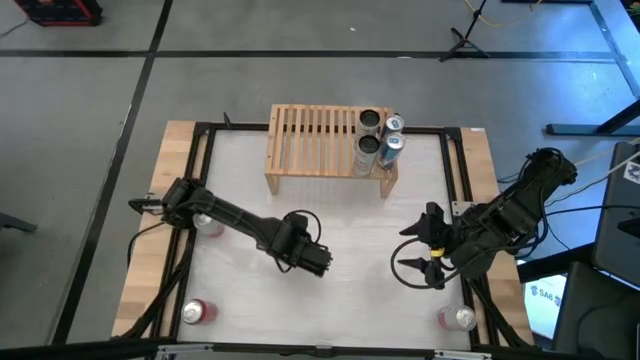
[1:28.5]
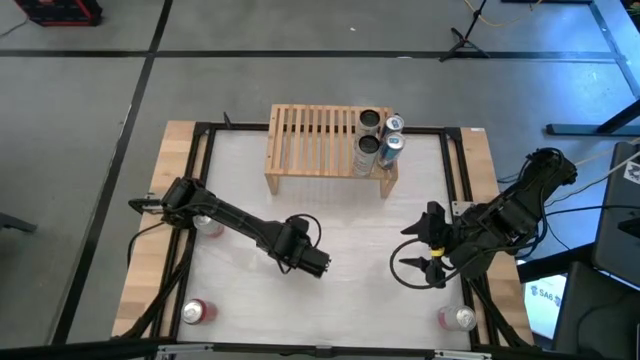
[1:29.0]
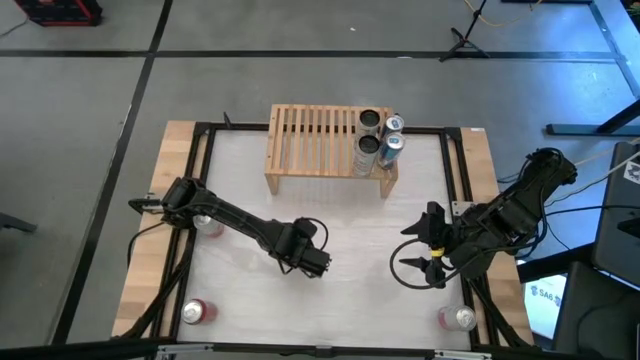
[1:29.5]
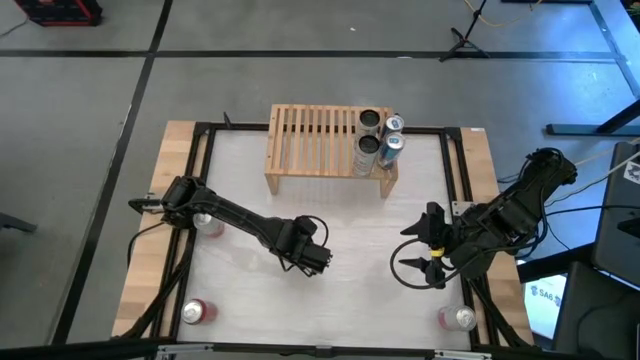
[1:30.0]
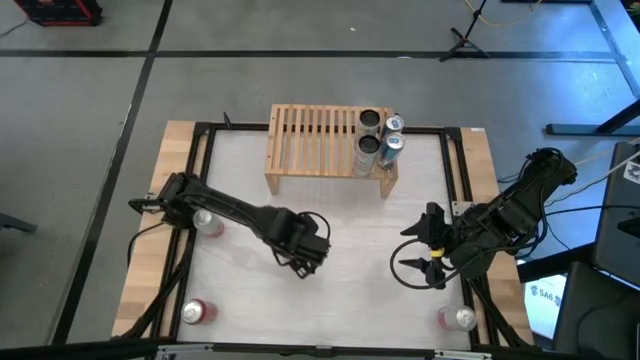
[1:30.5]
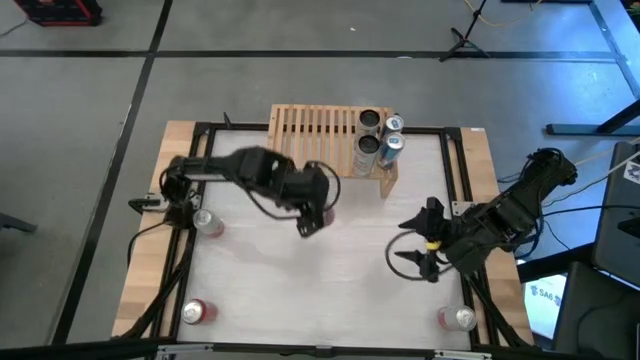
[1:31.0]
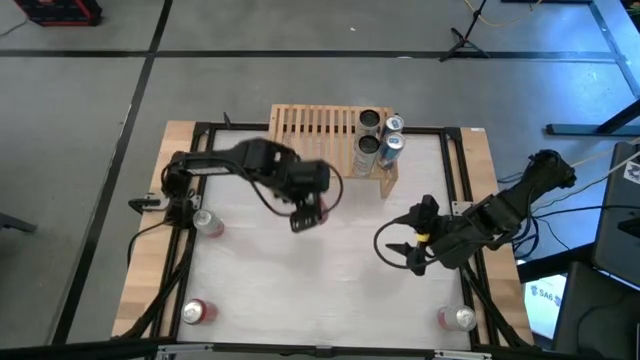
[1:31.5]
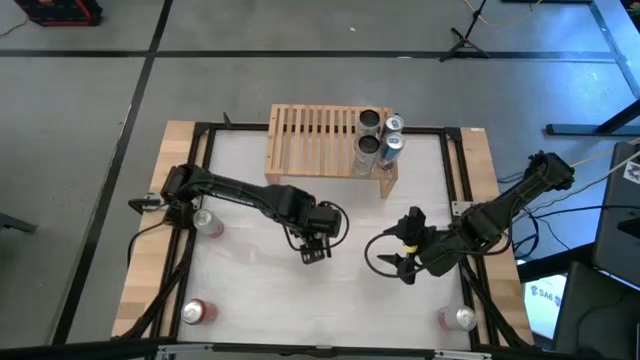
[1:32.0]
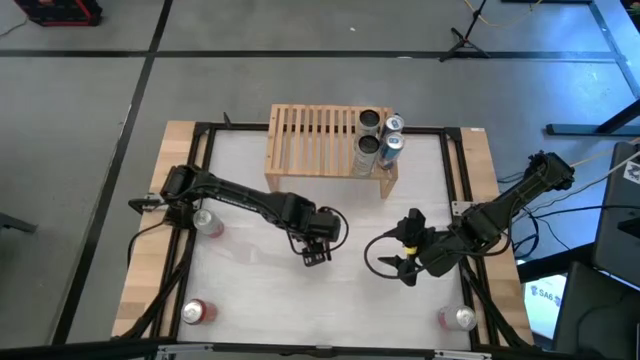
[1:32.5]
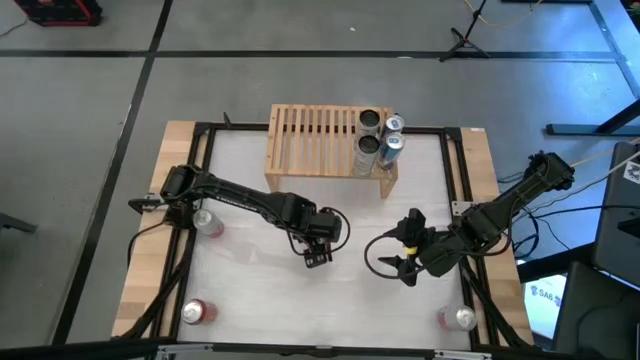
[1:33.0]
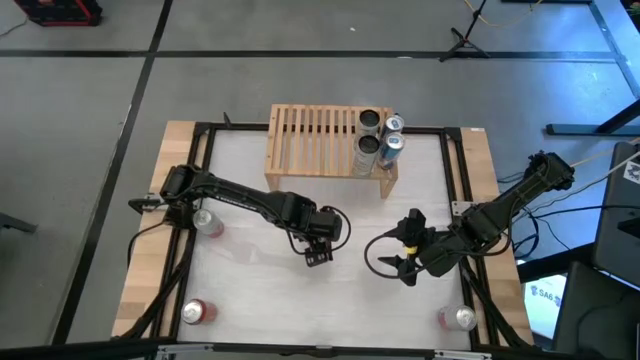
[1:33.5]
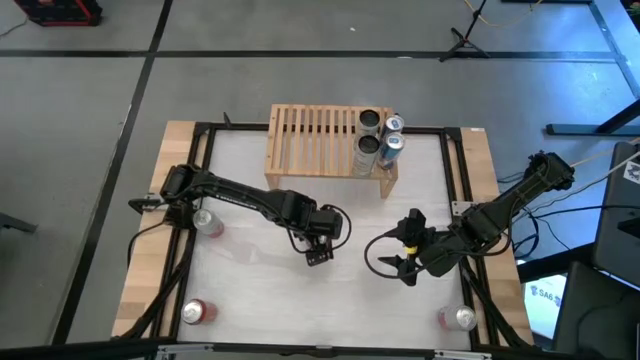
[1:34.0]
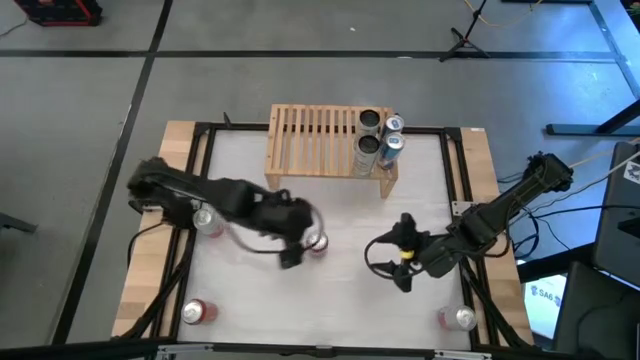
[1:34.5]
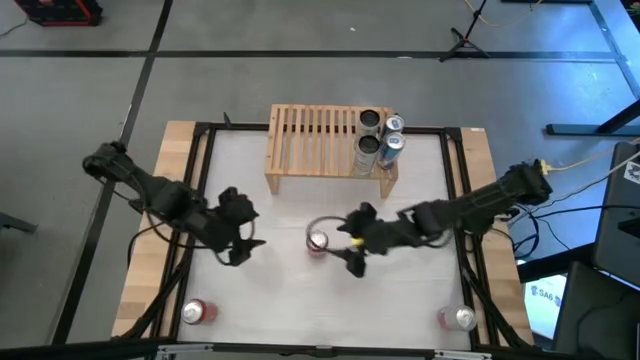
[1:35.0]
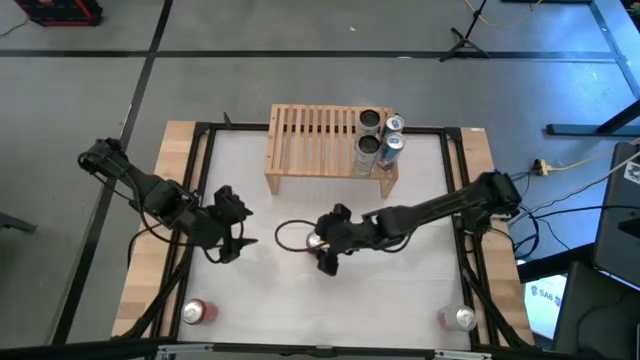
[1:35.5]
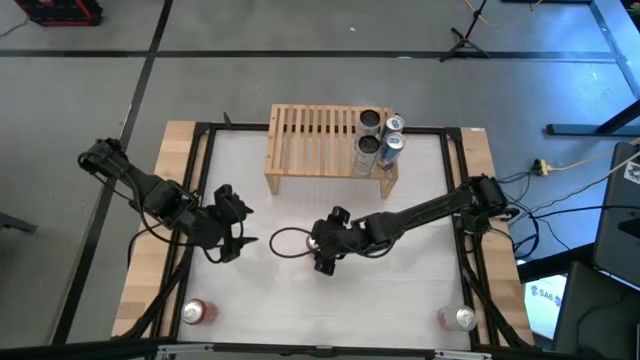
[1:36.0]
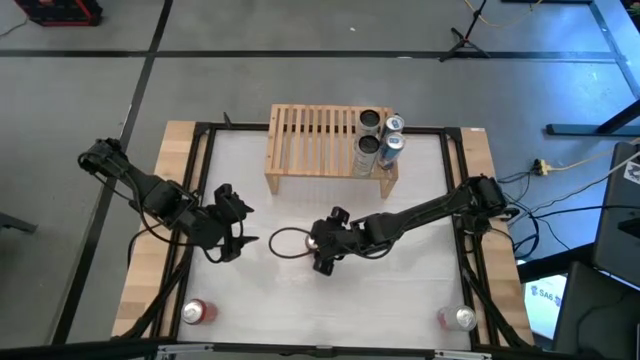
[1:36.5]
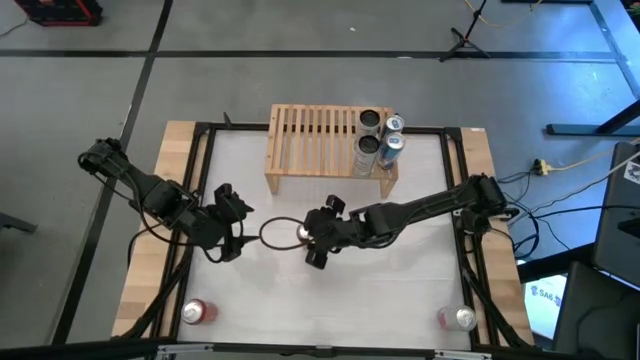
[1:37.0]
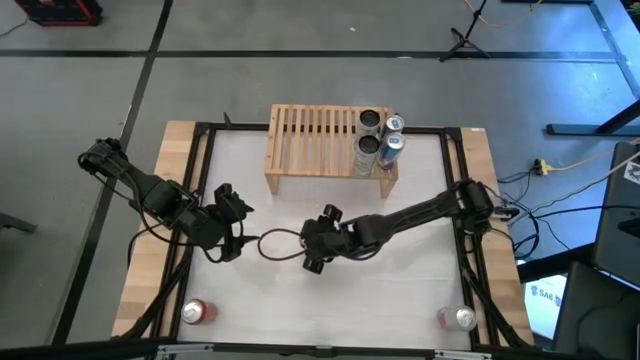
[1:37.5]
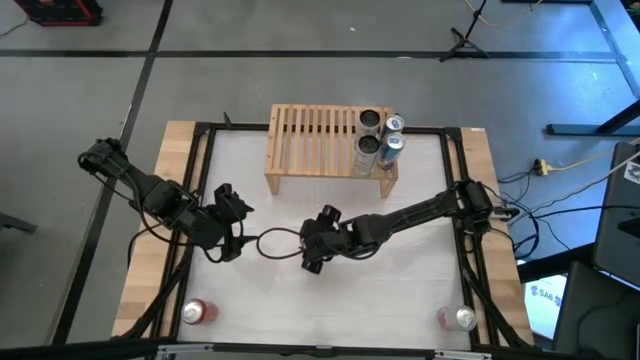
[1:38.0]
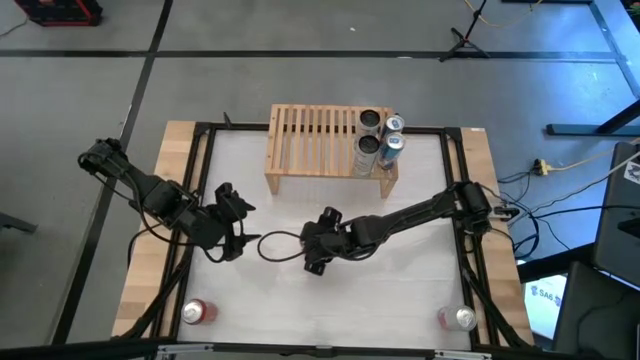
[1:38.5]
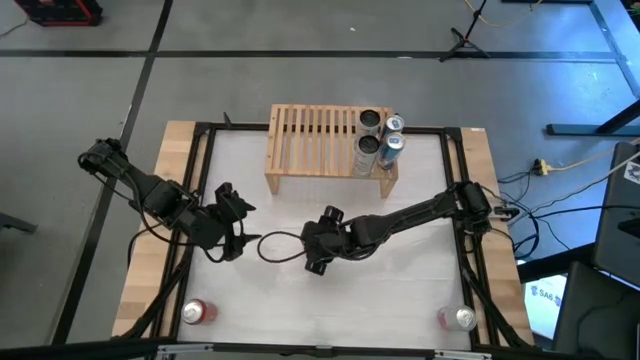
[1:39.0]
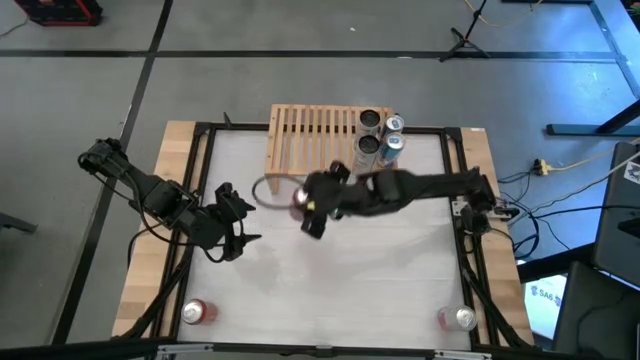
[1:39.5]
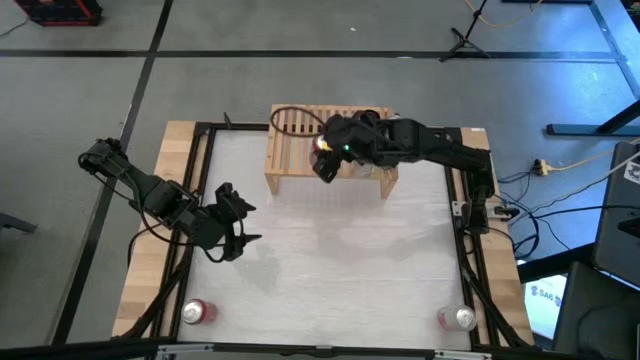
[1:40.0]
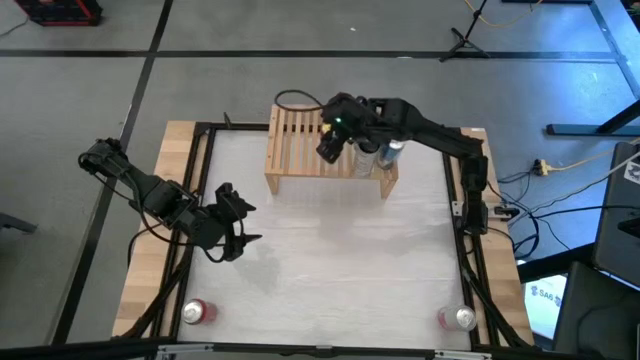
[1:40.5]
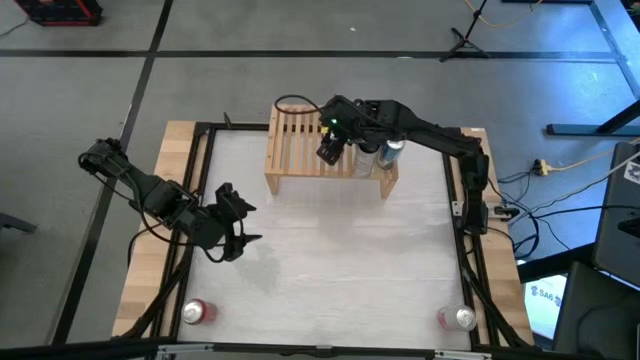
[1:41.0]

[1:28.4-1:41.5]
Task: Place canned beverage on shelf
Put the top red soda can on the shelf

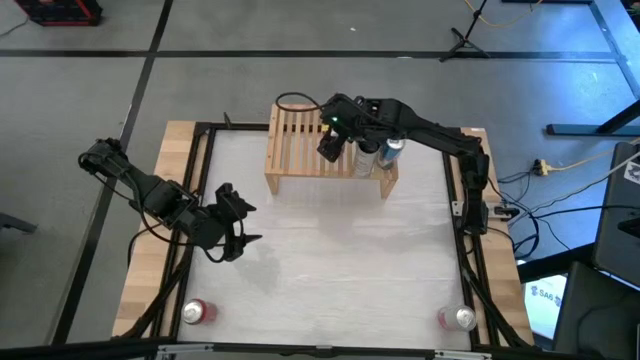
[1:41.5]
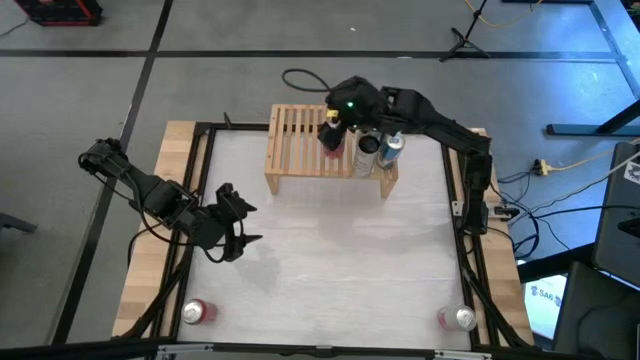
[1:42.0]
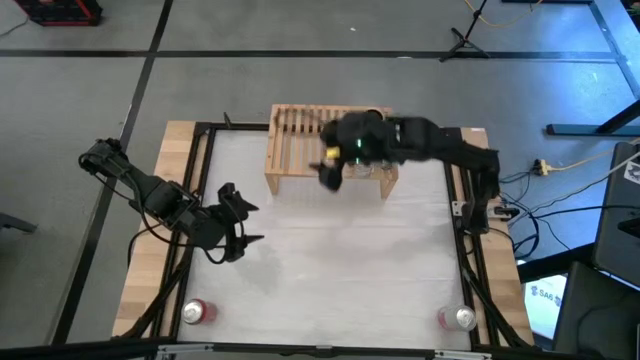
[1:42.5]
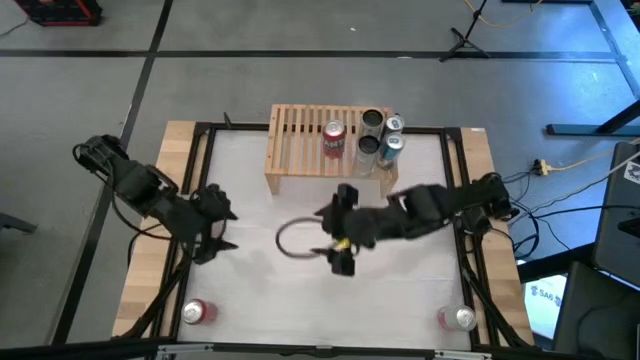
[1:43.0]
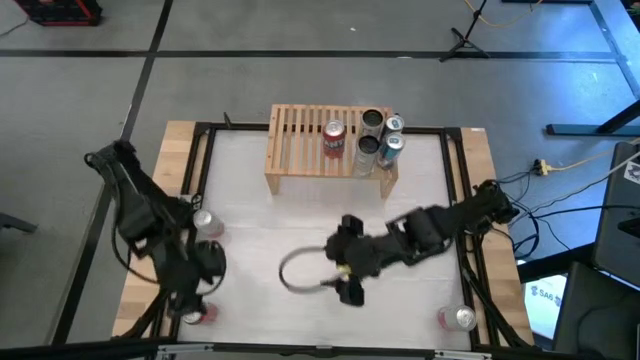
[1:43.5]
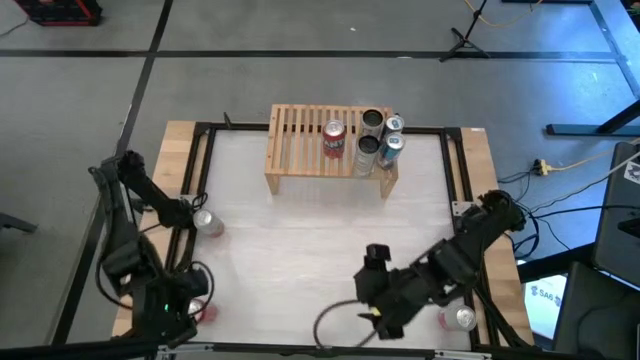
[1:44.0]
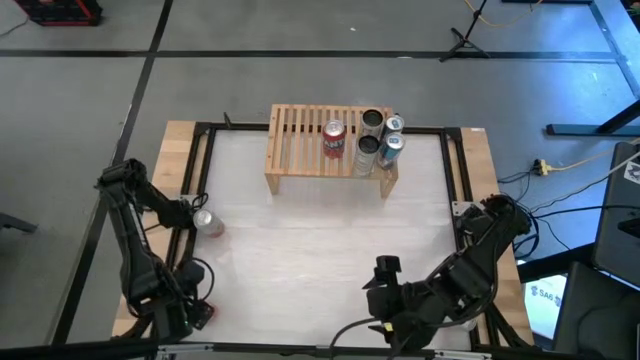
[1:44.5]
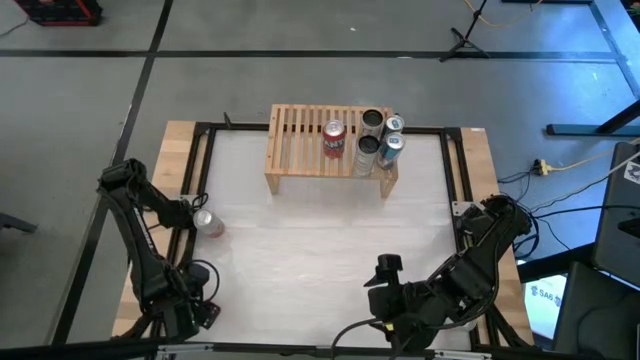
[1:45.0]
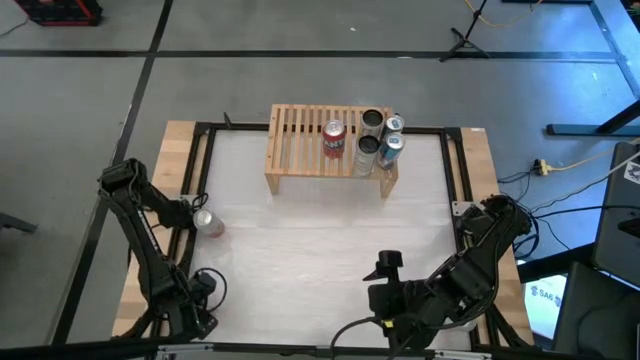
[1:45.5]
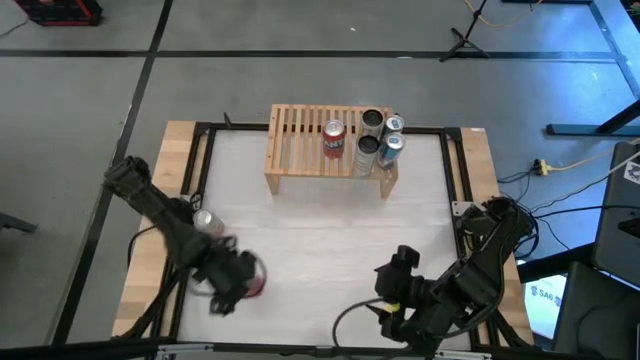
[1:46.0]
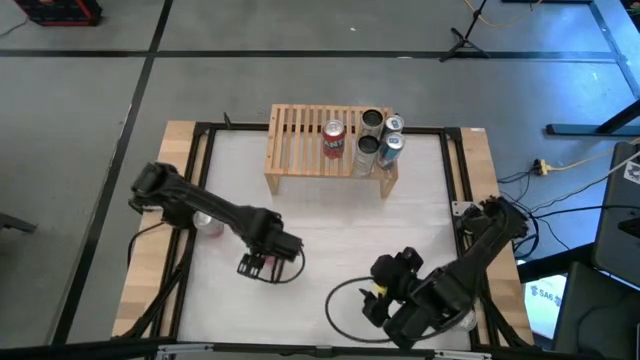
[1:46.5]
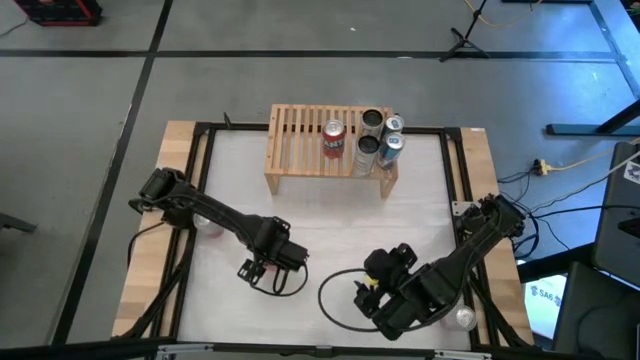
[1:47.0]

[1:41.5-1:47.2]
Put the red soda can on the shelf aligned with the other red soda can

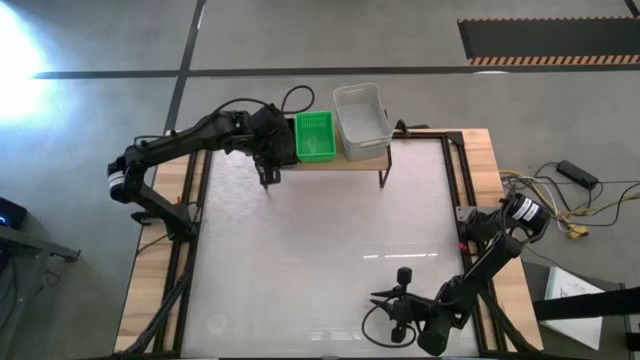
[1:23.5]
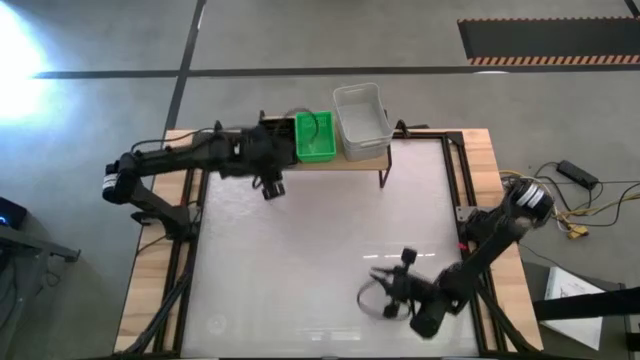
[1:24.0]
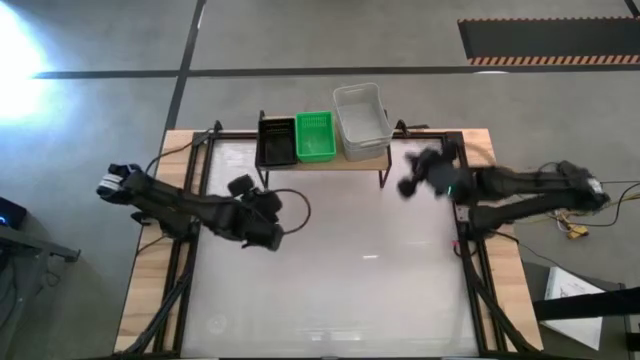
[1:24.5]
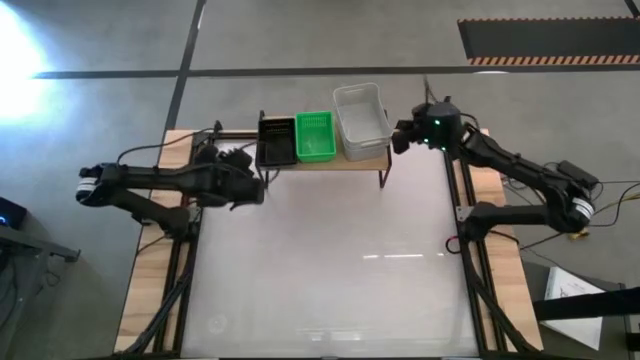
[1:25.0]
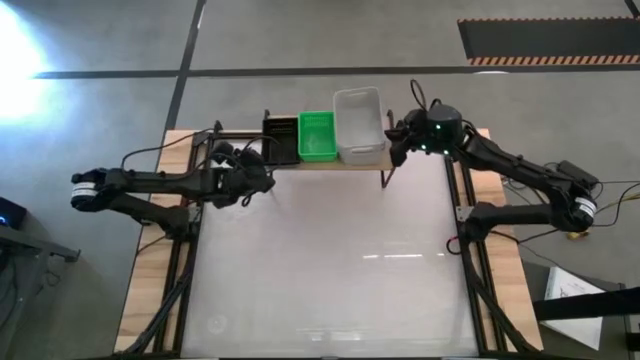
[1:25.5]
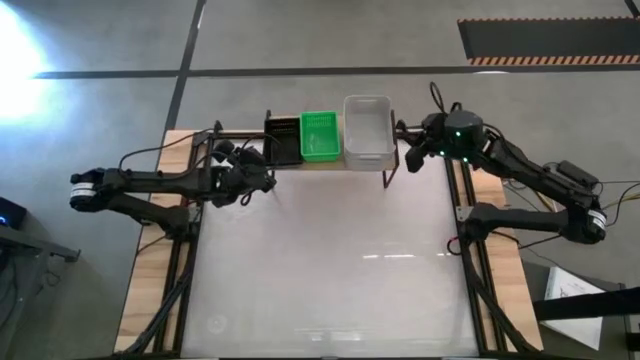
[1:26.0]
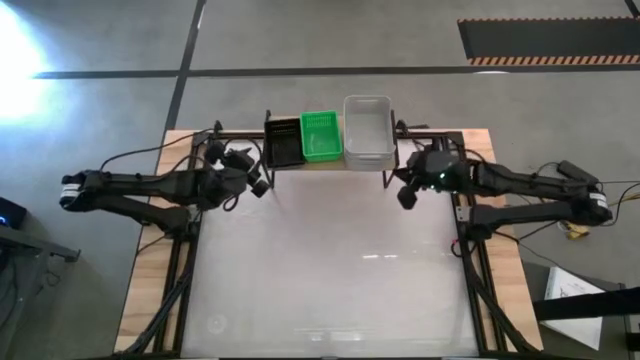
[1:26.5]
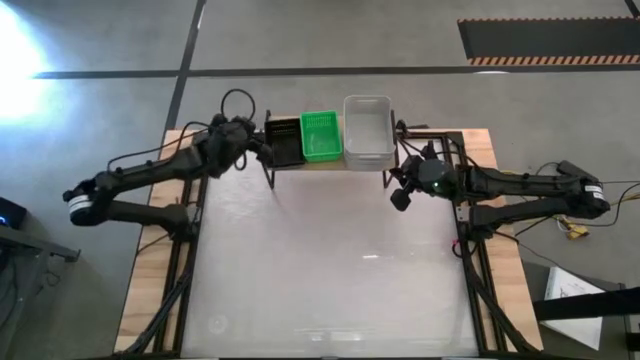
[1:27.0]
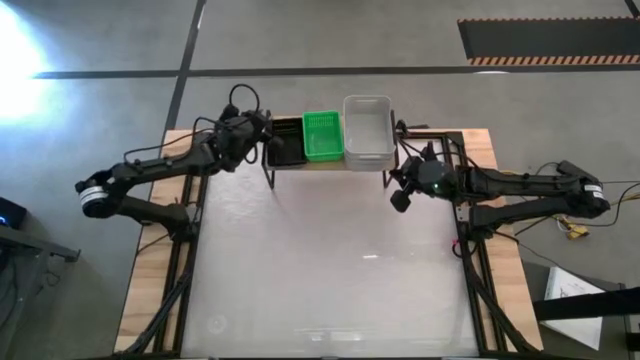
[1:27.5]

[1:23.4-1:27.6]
Task: Stack baskets on shelf by color
Adjust the bins on the shelf
